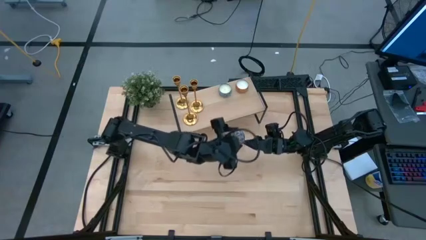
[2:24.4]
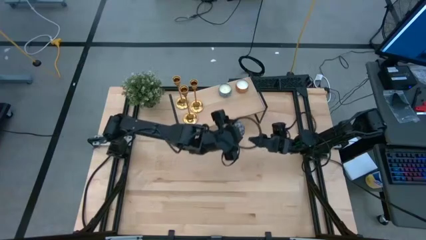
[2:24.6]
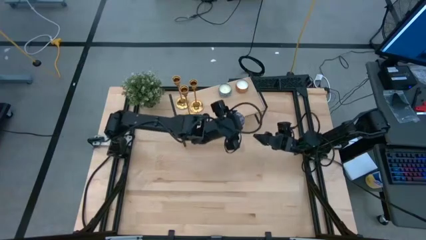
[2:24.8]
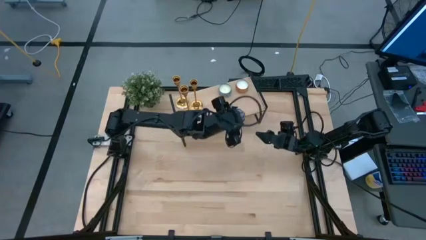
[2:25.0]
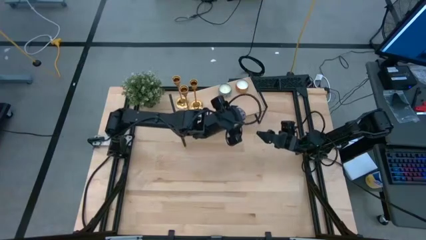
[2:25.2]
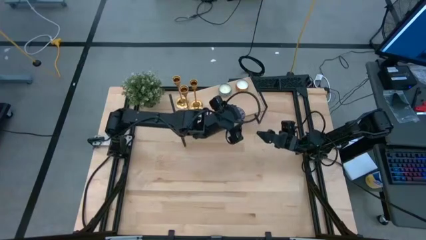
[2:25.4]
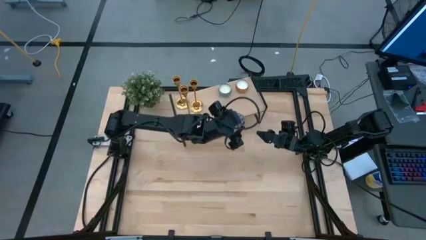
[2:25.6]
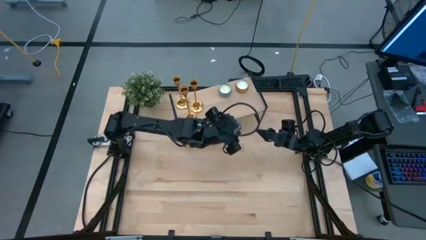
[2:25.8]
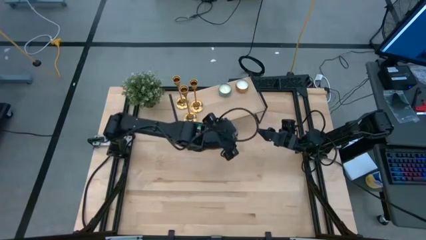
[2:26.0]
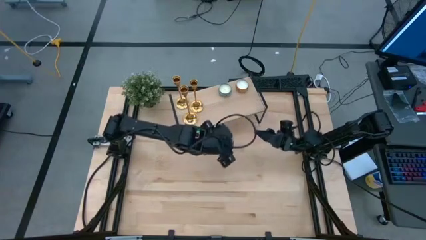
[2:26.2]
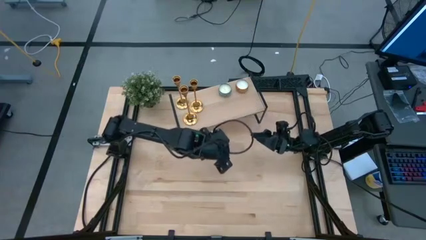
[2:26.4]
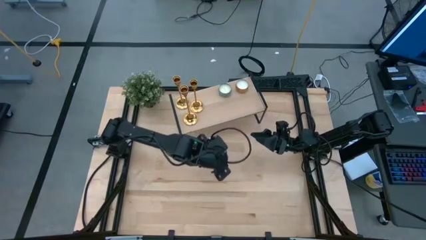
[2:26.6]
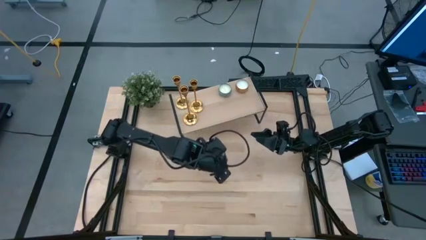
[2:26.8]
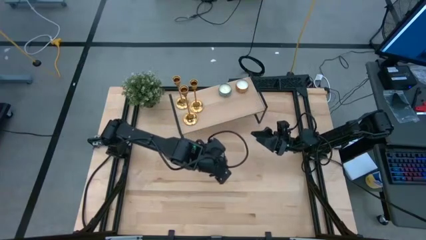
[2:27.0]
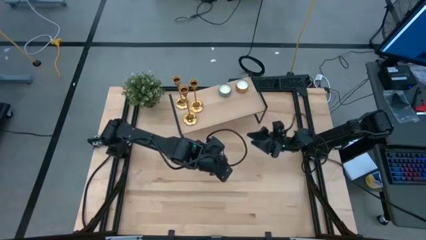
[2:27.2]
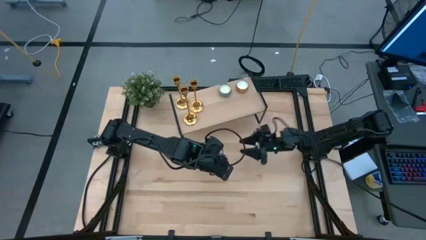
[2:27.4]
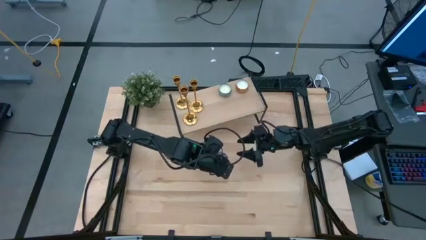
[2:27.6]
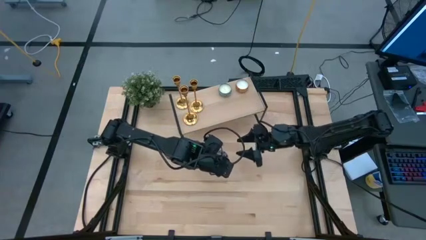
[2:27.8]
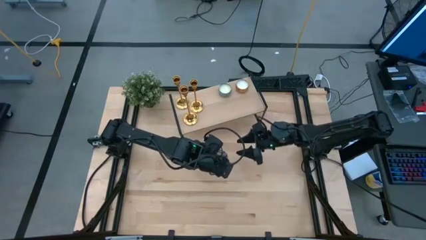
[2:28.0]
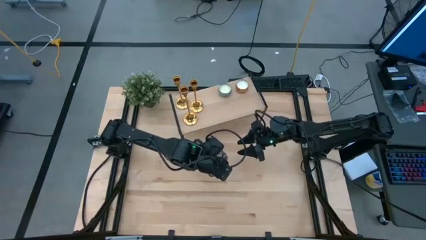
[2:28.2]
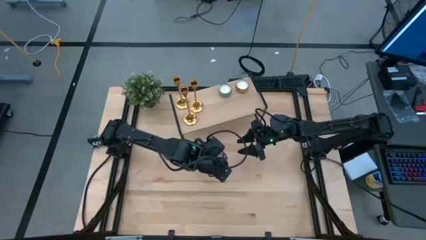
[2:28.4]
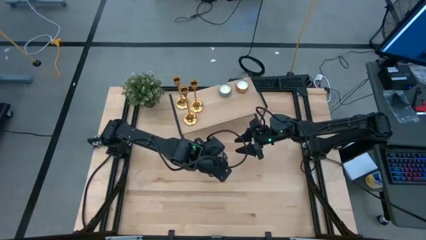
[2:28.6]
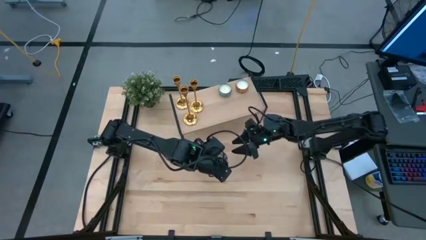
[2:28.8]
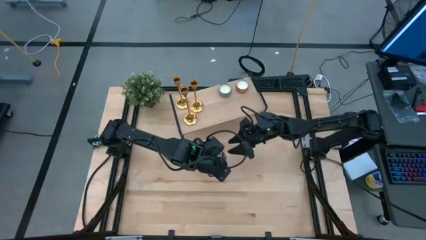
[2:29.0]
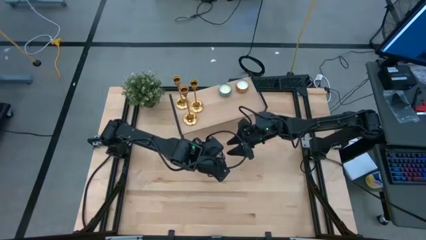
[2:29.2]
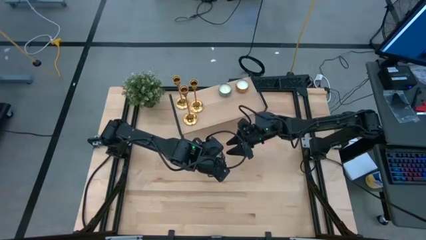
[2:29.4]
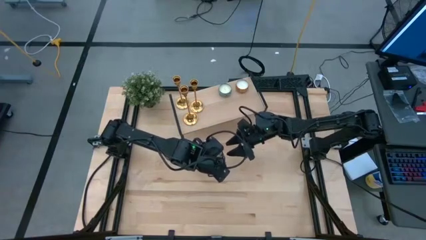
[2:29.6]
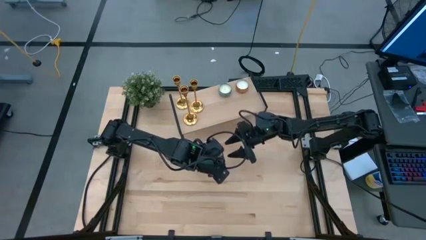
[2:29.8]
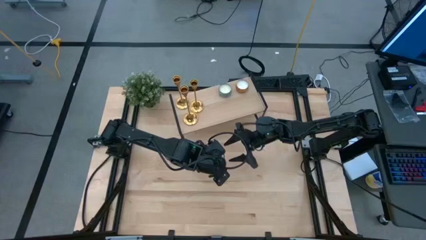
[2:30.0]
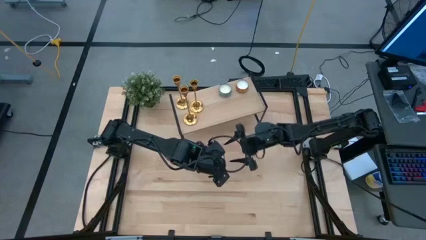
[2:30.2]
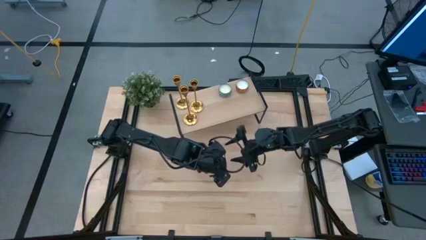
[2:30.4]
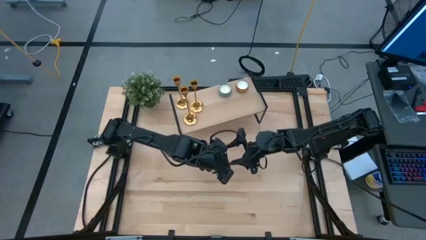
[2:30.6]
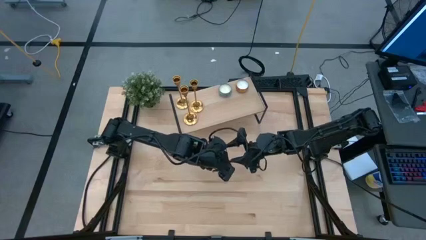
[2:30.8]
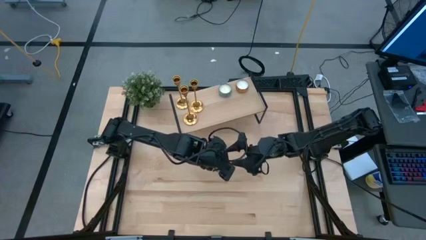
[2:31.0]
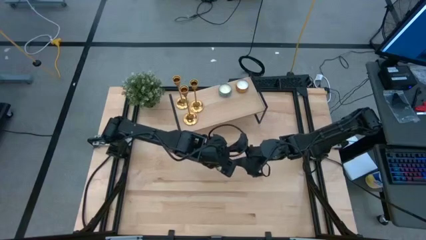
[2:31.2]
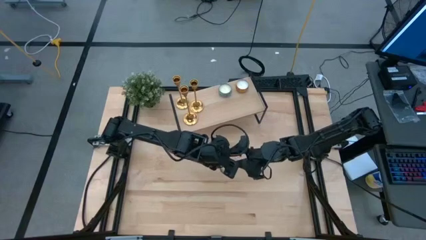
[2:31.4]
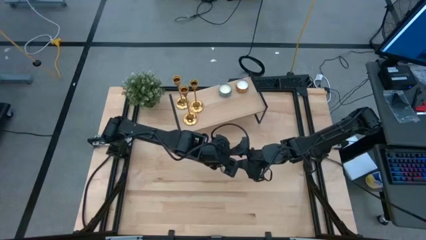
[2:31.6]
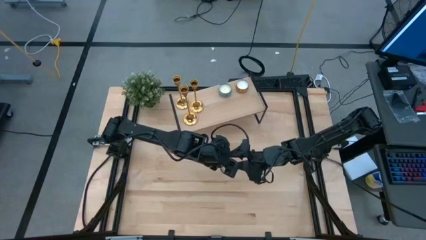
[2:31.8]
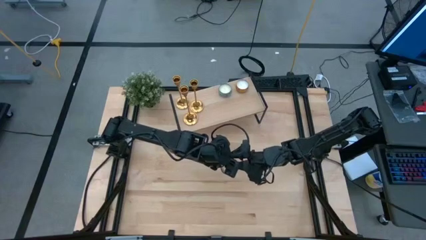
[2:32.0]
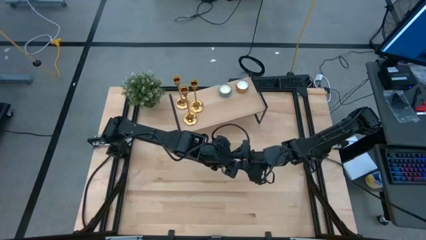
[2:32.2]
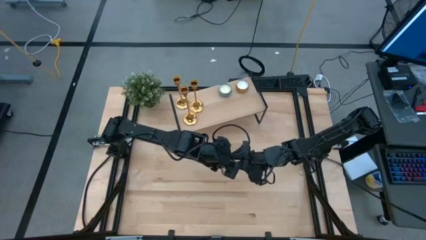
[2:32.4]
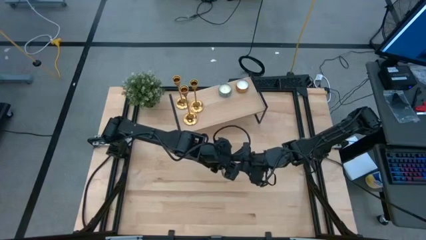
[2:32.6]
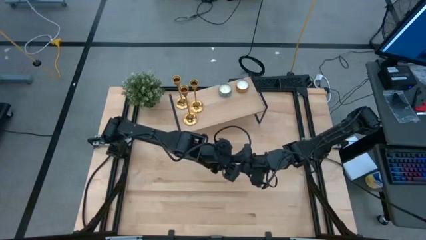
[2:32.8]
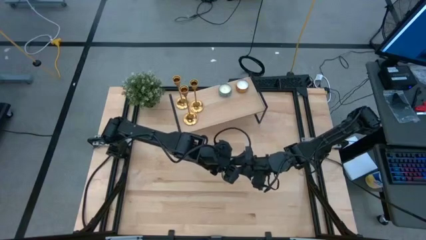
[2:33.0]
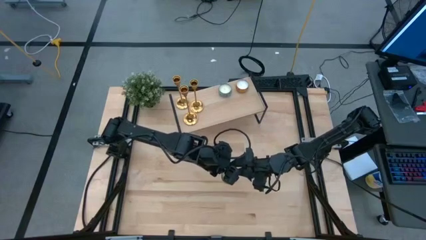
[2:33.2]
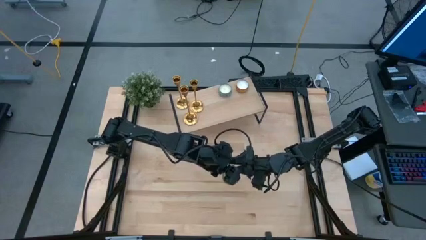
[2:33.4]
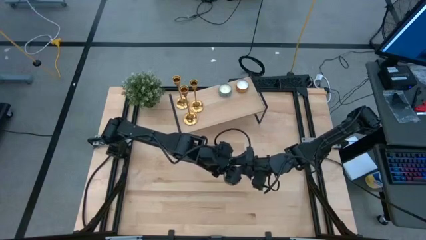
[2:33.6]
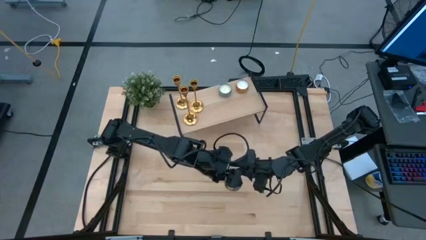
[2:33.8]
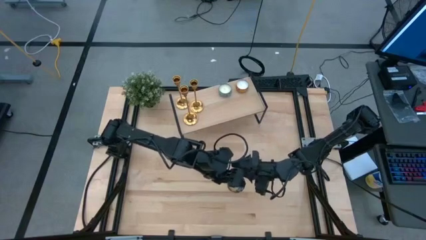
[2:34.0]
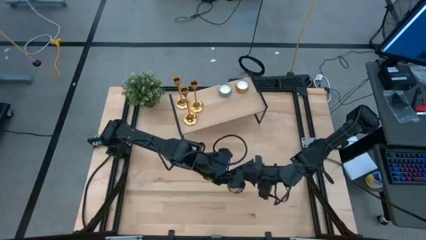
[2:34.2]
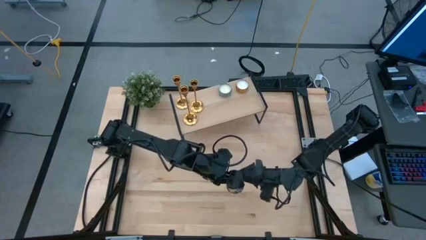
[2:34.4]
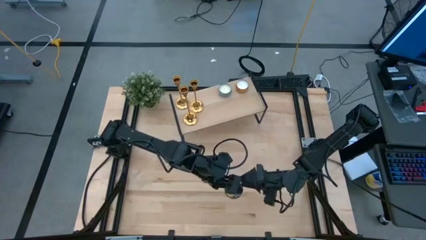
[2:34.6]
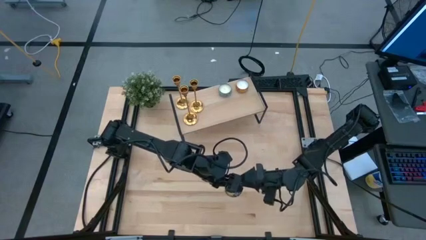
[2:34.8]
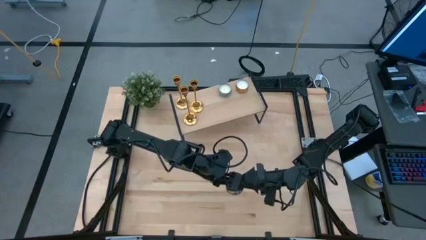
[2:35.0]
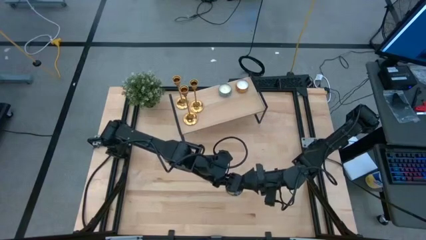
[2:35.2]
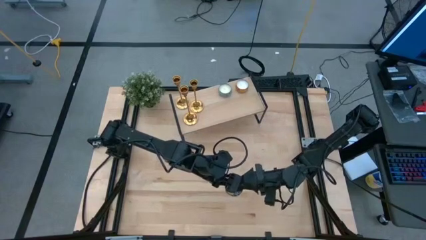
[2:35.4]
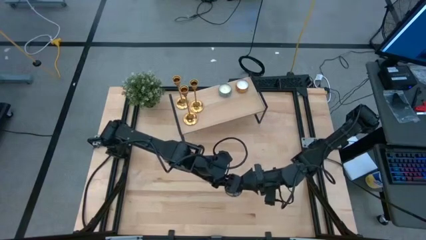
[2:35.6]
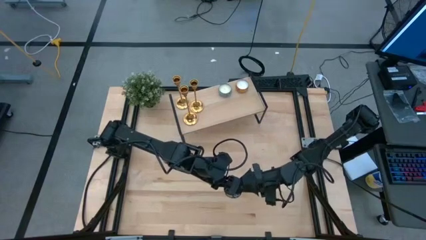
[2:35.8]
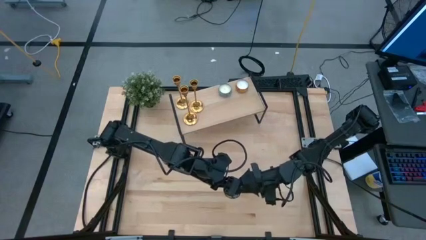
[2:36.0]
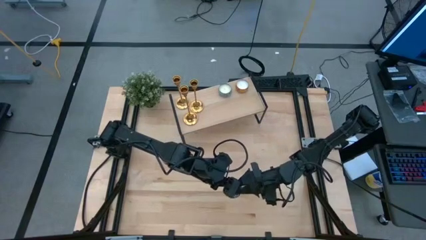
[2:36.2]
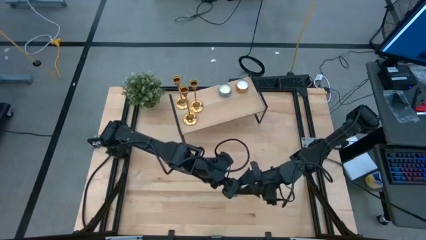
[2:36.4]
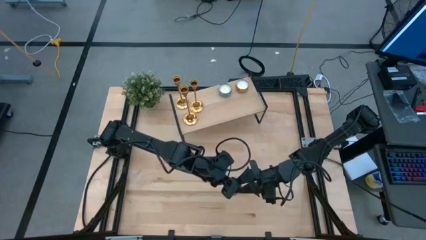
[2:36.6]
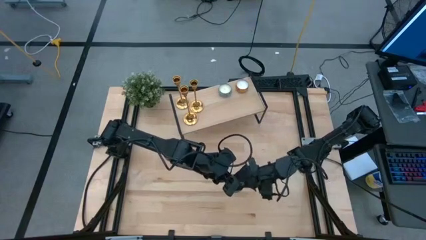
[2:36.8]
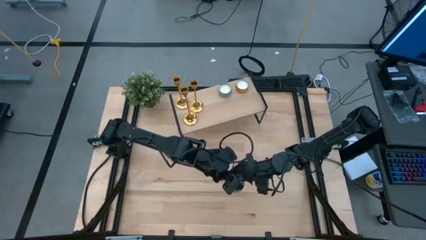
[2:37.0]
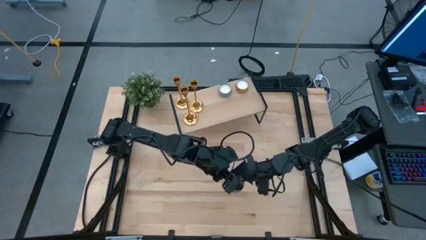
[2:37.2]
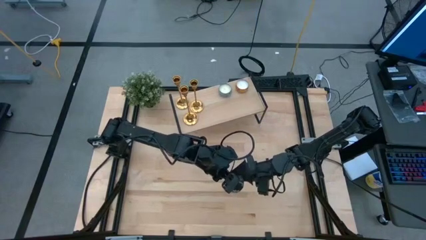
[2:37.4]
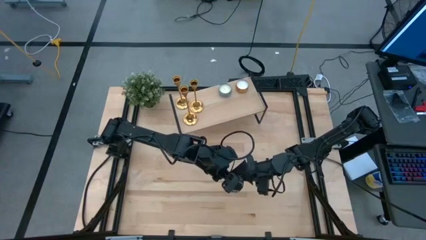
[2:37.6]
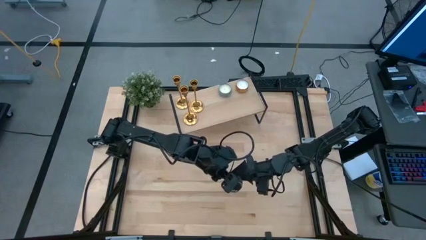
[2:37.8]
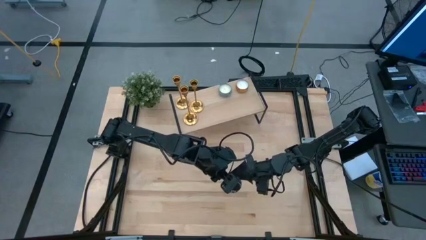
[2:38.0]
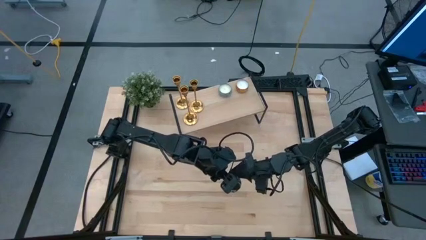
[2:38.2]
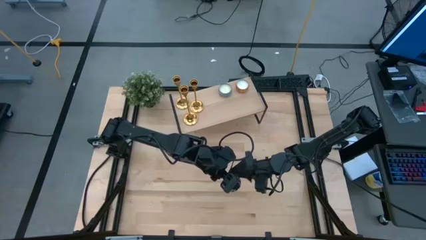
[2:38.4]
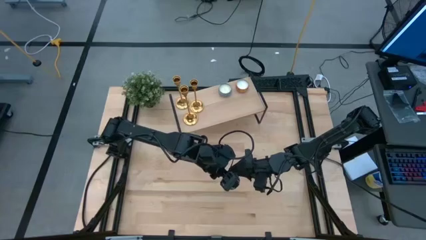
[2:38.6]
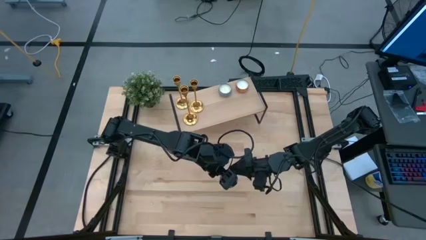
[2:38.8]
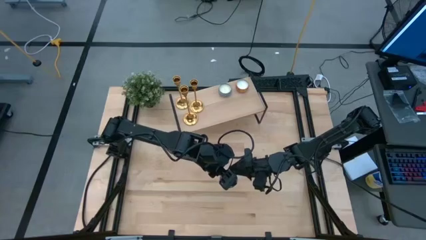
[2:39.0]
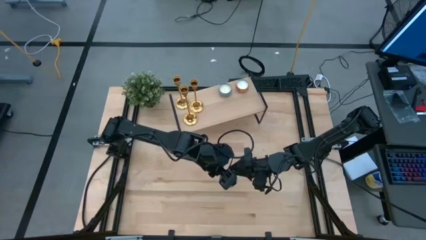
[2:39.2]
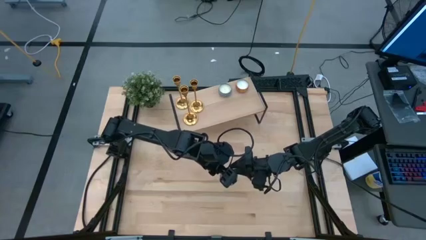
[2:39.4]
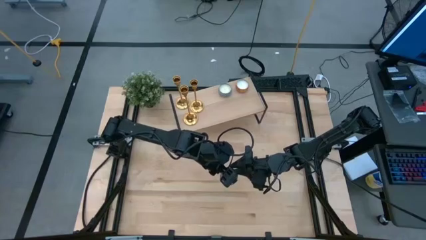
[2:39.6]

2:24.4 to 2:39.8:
Task: Pick & Place candle stick holders
Put the black scented candle on the shelf
